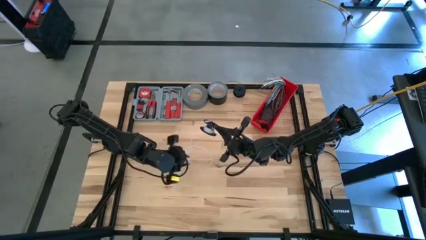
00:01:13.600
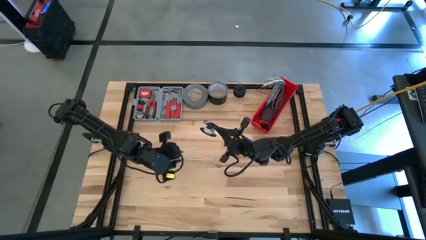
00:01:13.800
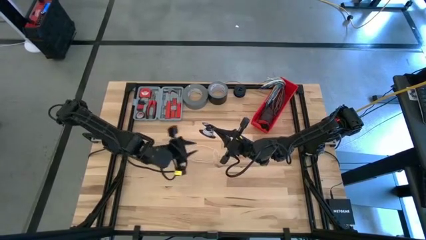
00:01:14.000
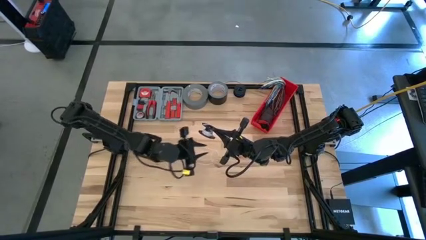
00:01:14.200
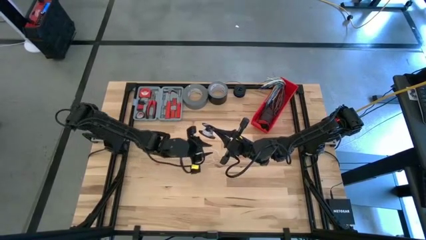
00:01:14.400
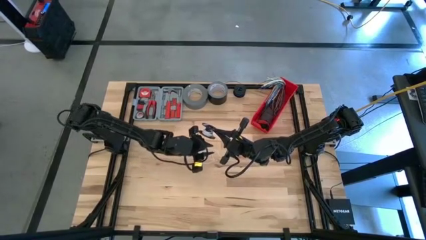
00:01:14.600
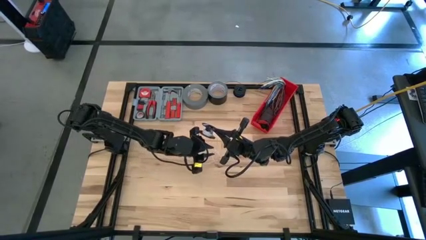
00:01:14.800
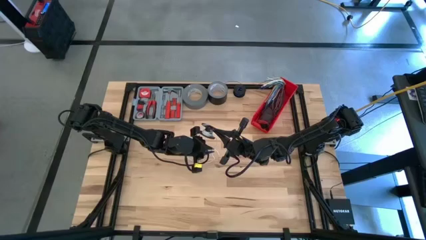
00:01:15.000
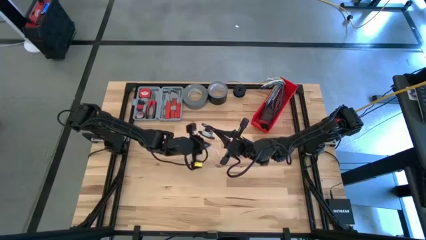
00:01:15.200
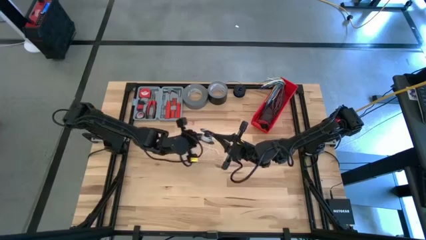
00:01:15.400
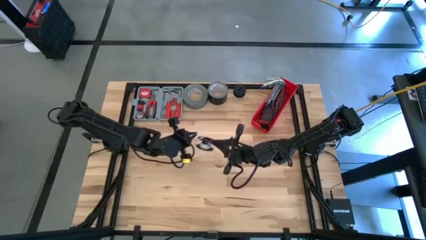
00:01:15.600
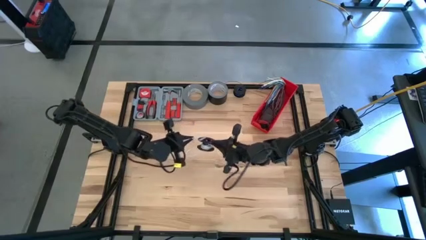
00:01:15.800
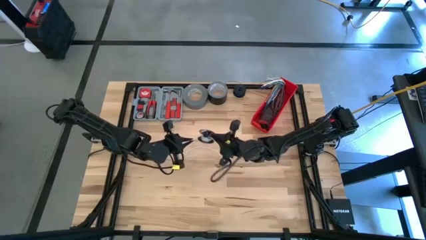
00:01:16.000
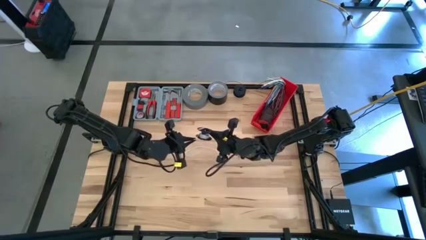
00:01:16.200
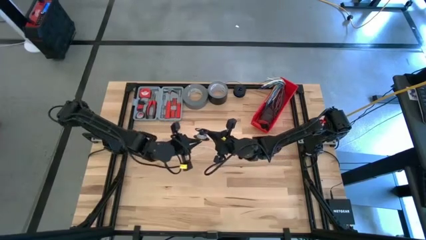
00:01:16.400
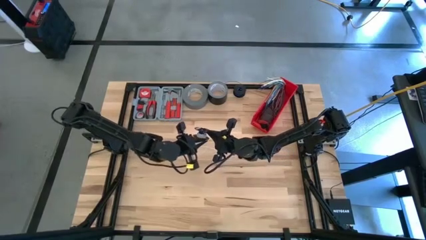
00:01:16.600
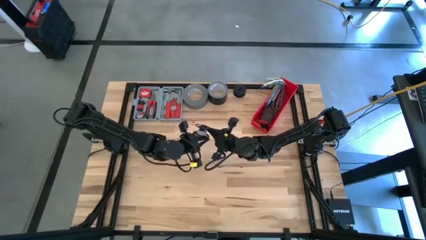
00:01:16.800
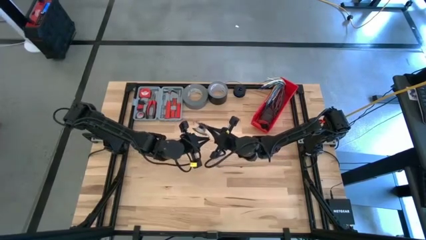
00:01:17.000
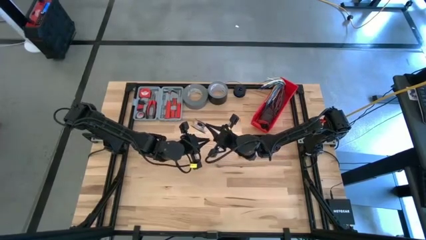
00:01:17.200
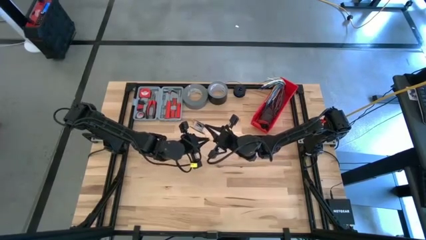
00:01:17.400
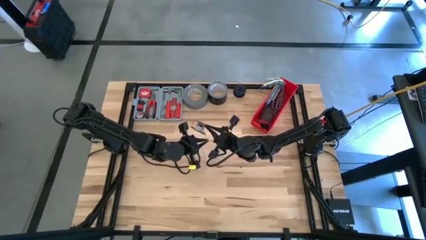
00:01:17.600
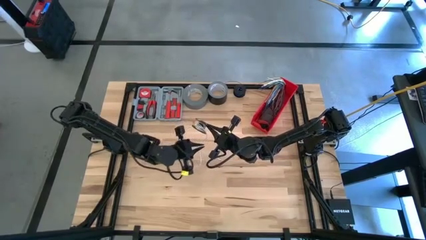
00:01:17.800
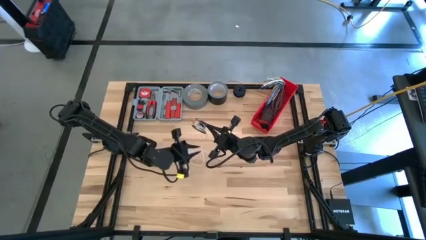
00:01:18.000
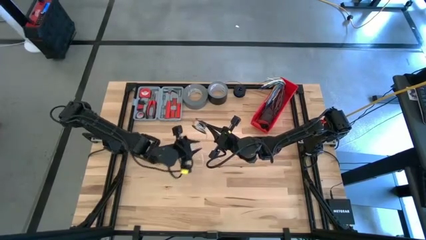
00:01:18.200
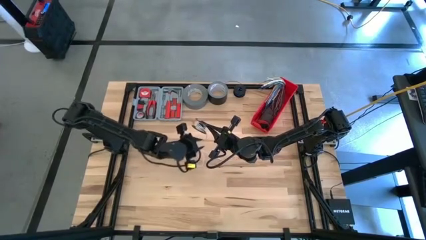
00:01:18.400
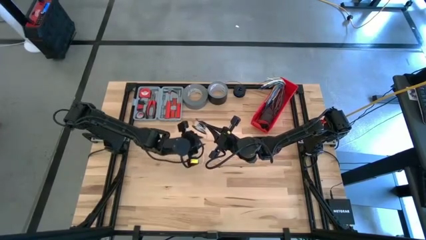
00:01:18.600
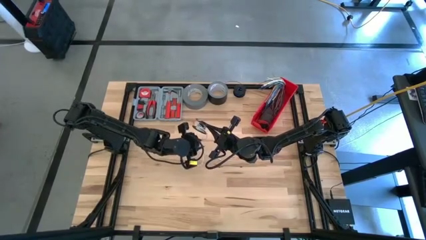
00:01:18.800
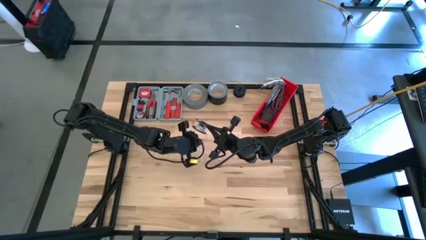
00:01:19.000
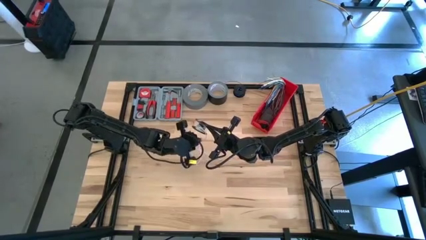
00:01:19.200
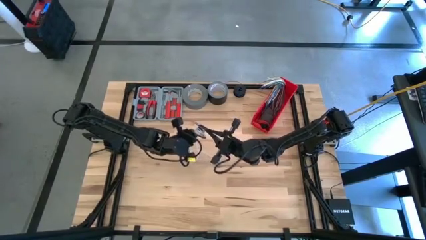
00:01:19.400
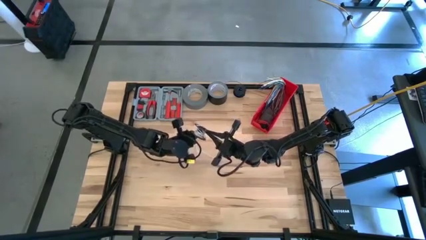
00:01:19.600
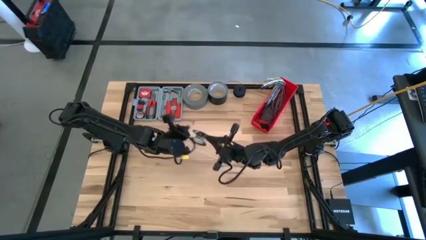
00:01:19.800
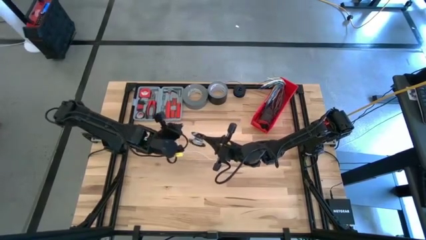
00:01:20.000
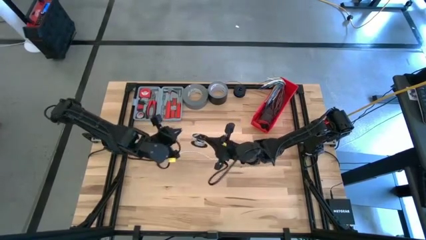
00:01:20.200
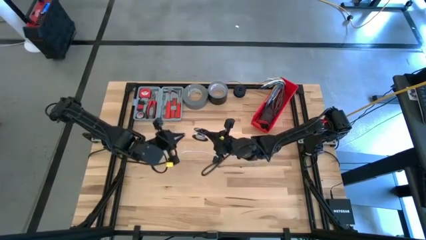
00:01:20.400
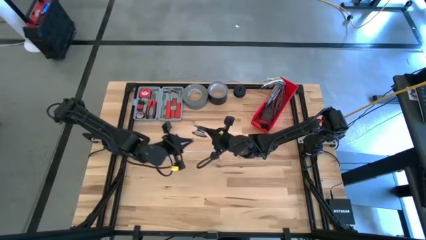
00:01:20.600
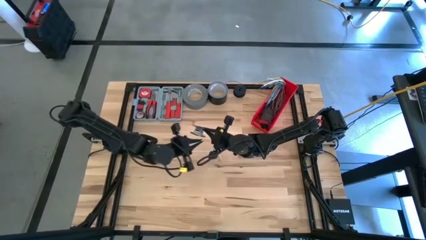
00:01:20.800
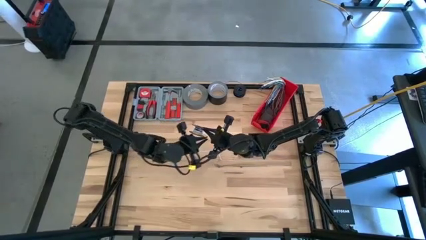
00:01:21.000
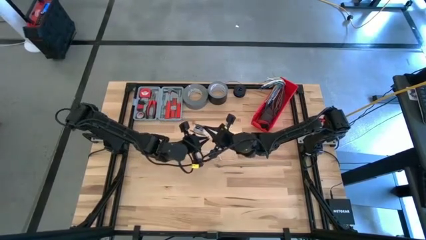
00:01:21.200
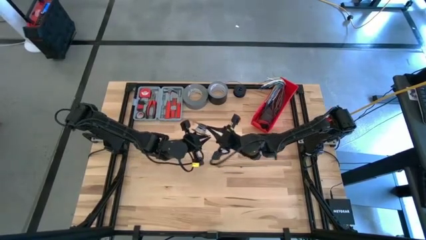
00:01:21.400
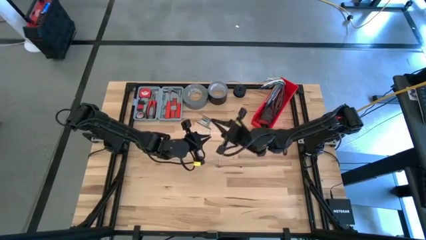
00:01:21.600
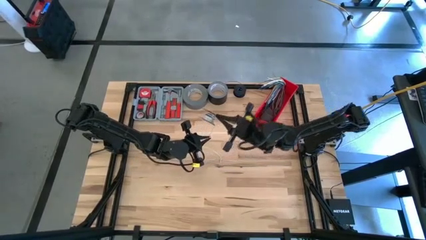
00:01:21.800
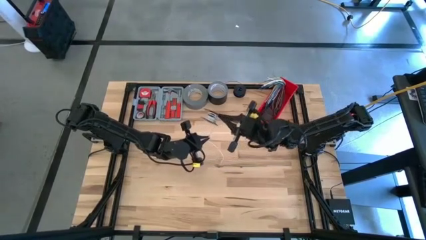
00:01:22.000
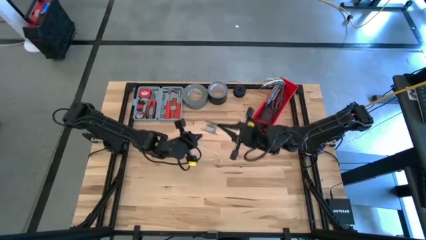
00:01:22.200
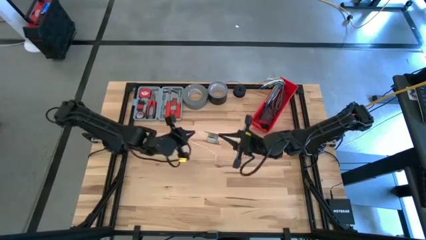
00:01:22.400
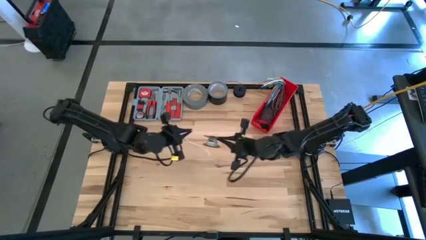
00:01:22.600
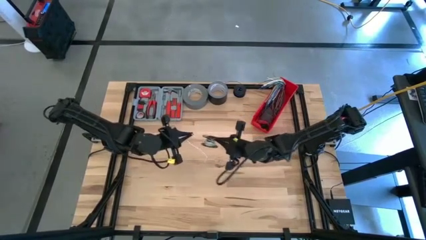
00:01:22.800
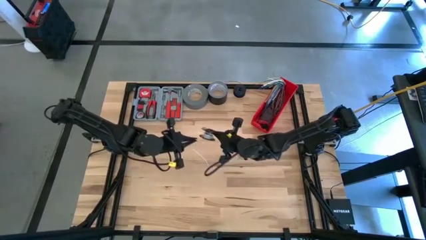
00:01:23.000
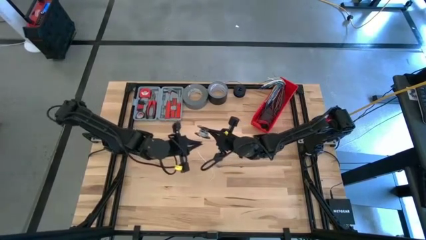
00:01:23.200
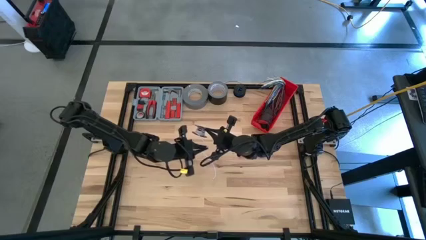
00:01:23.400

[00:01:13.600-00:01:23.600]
Task: Coil cords
Coil the white wire onto the spool
